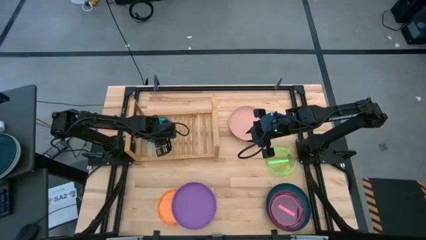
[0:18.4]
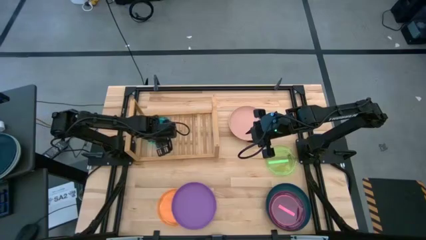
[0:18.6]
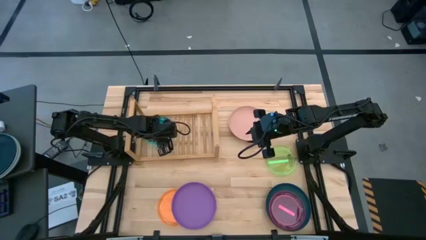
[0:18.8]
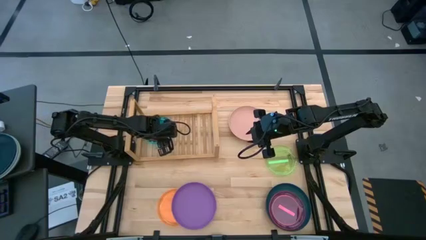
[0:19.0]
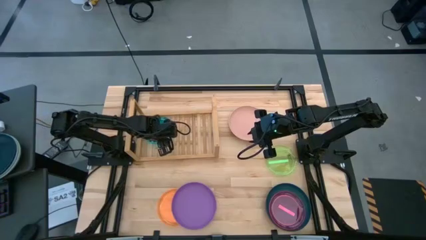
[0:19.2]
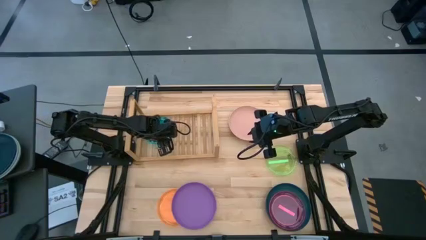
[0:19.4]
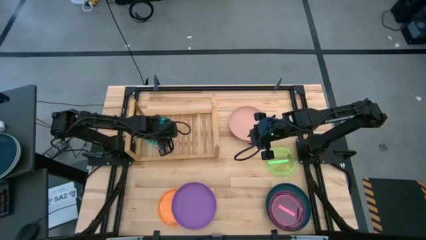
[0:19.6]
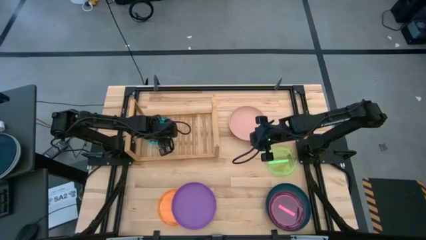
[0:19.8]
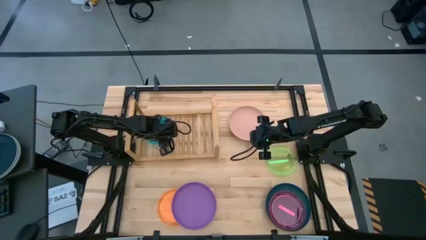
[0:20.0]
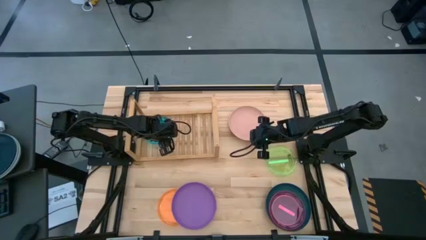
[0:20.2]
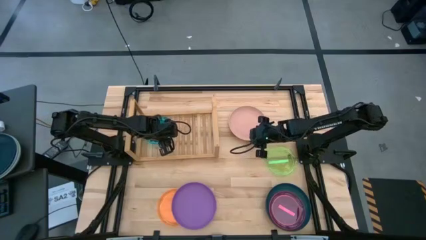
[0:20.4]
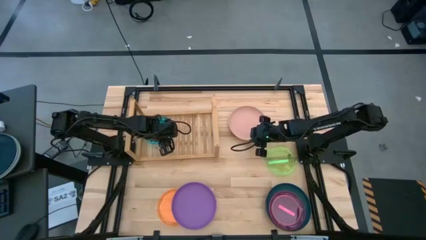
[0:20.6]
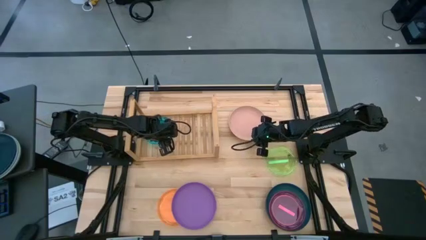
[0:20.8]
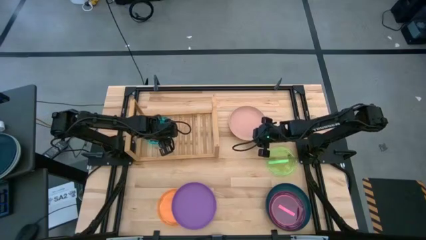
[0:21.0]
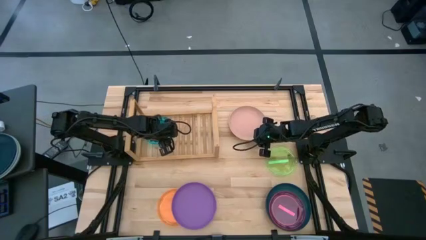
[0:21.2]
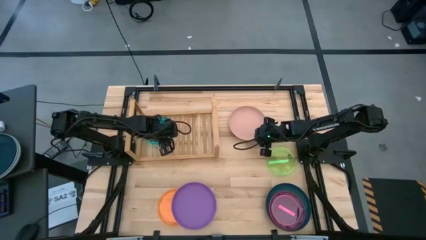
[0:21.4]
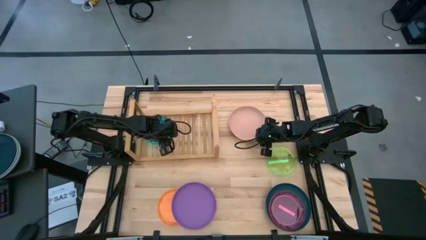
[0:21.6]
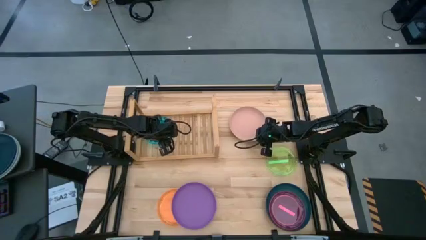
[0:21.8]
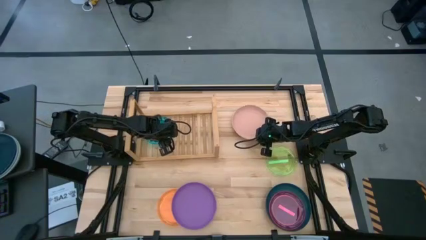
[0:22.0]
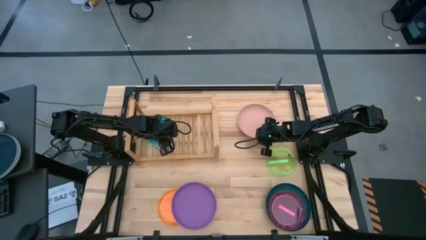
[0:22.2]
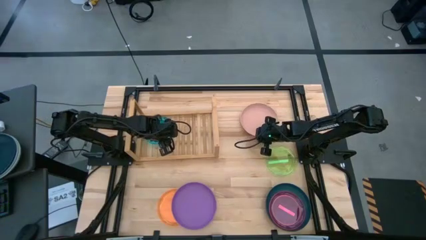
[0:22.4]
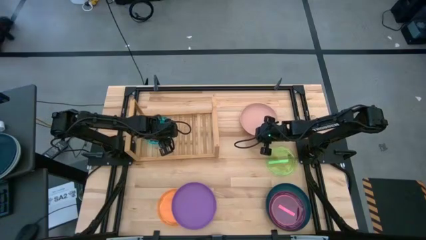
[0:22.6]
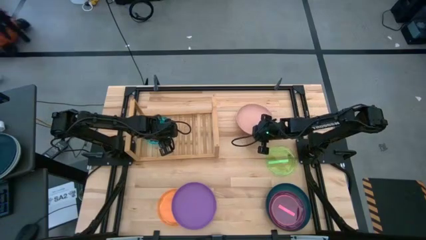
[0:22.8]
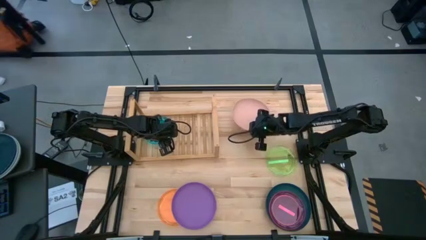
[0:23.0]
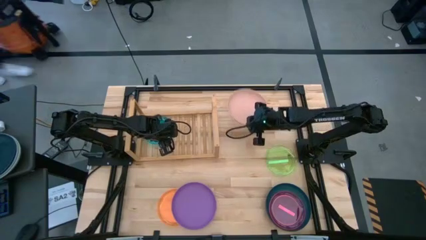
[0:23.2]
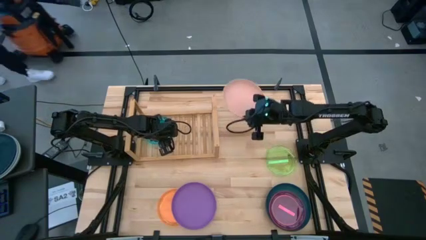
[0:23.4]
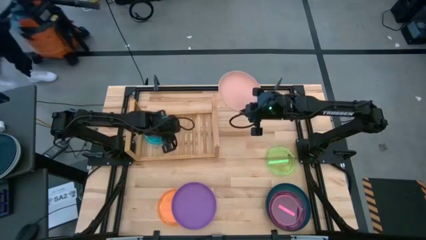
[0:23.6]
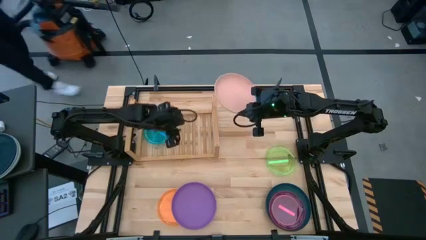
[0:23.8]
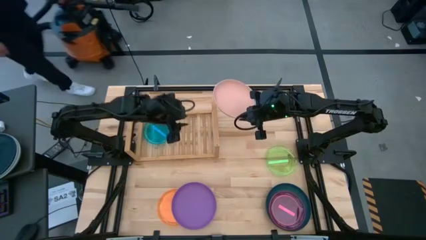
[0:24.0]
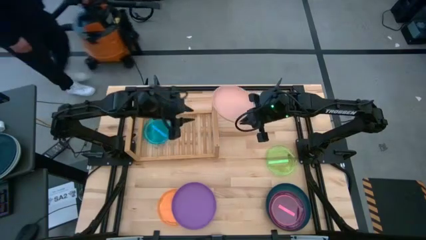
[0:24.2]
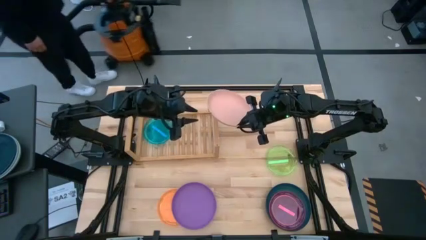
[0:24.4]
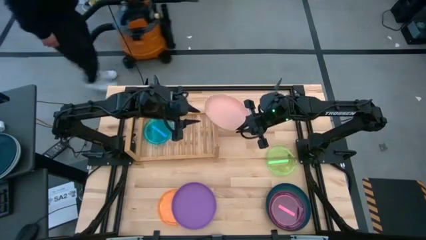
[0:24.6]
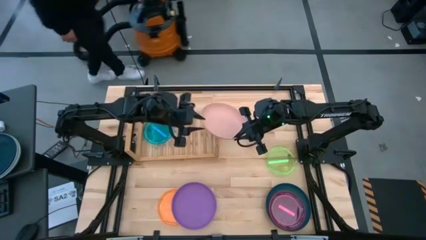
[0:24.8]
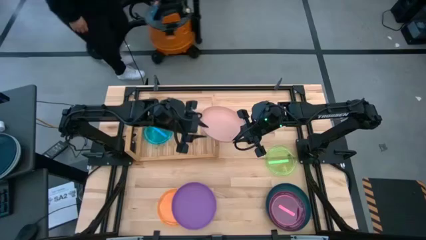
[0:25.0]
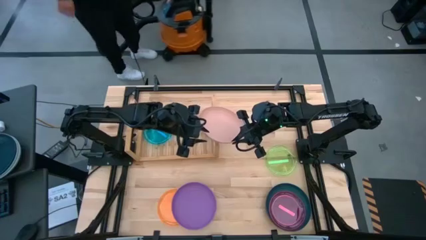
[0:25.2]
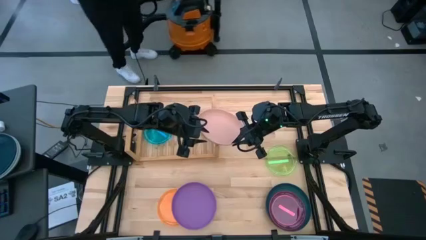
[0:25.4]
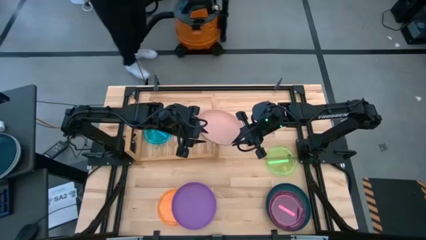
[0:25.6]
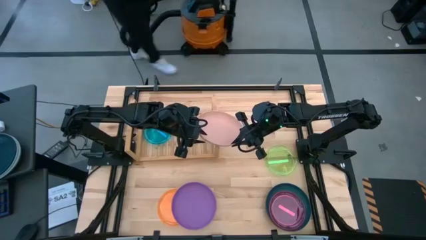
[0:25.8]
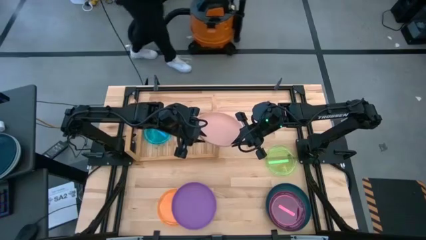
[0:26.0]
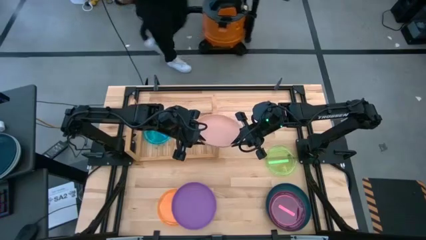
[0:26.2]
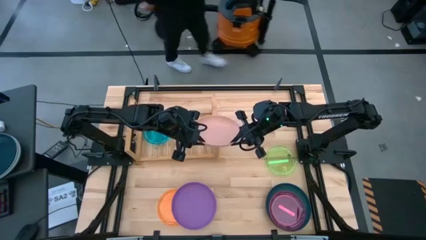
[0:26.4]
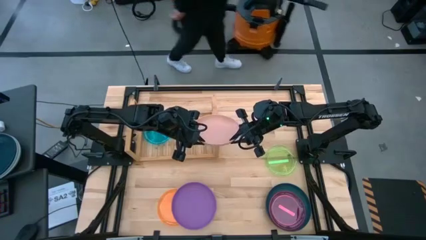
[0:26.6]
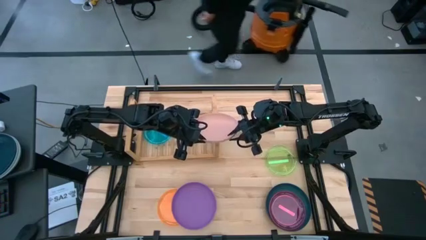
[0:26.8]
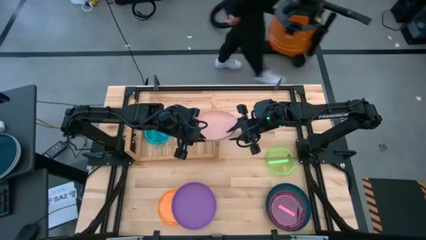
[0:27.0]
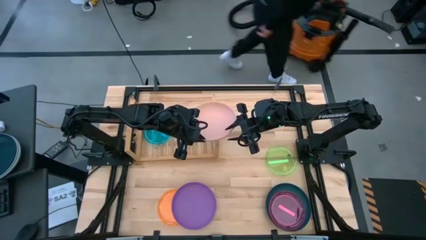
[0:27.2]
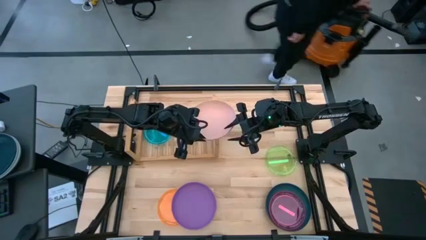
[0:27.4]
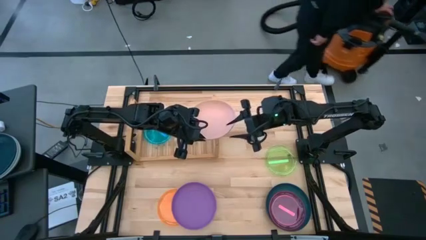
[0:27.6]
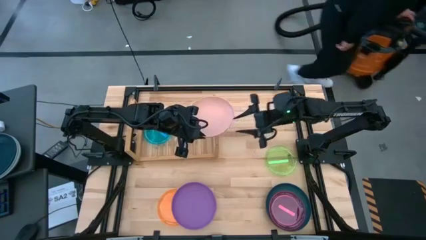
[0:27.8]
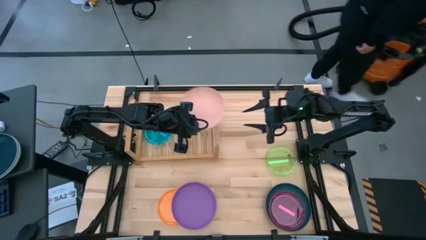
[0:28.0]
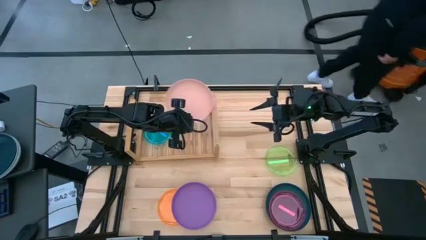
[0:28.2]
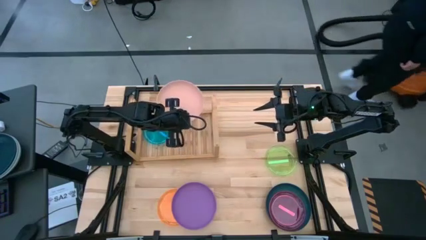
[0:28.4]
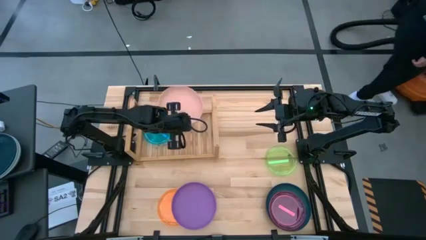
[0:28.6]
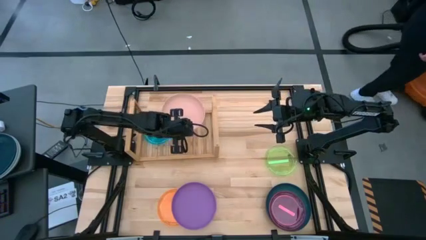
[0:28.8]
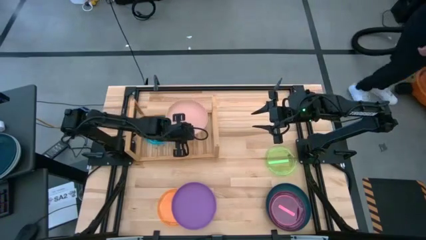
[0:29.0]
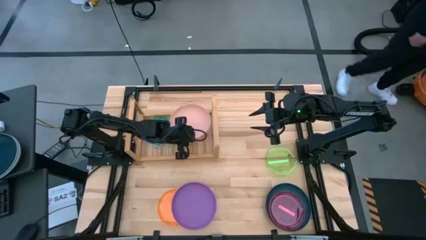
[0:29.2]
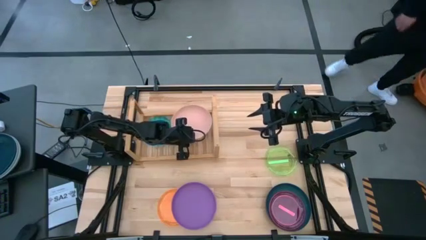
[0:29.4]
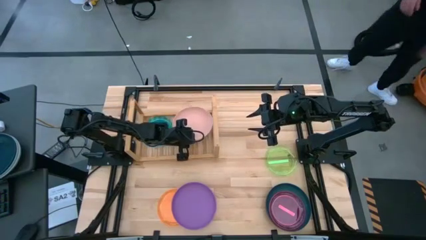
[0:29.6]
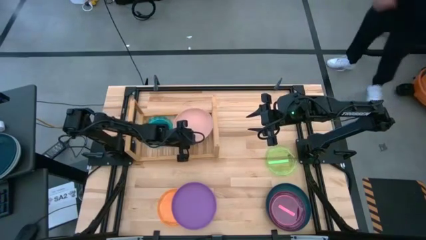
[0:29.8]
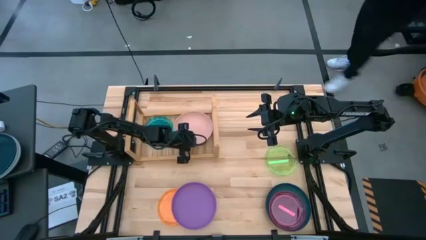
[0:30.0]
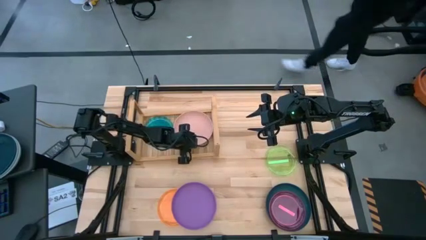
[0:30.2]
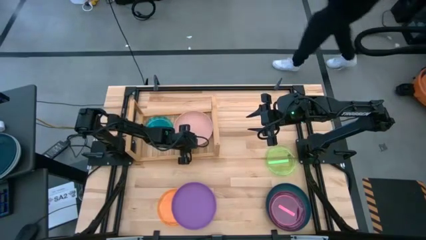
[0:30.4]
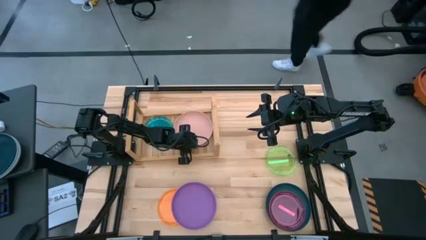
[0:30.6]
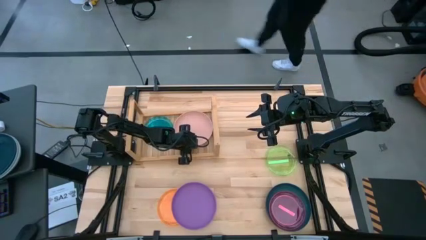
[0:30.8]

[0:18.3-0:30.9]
Task: Place and stack plates onto a shelf
Put the light brown plate on the shelf
